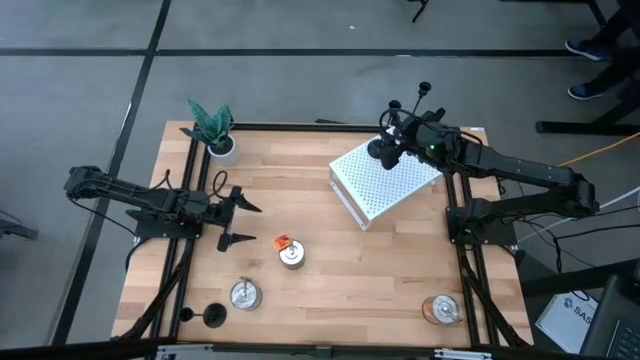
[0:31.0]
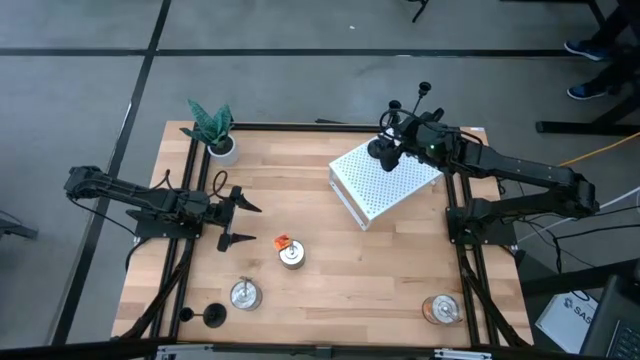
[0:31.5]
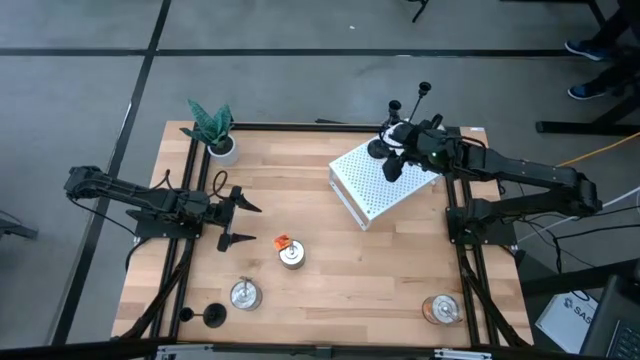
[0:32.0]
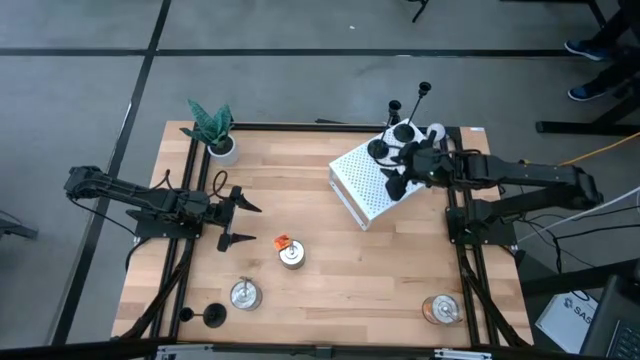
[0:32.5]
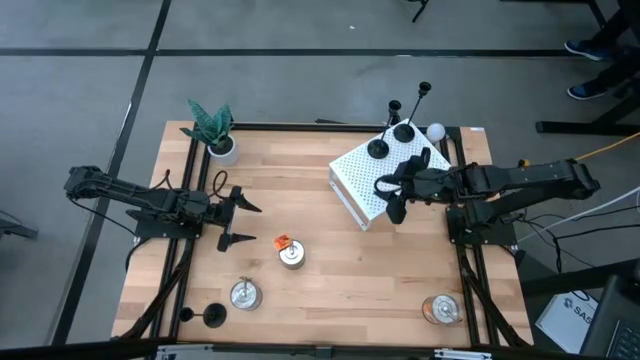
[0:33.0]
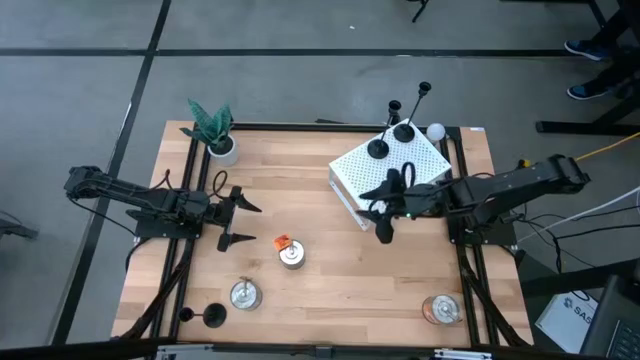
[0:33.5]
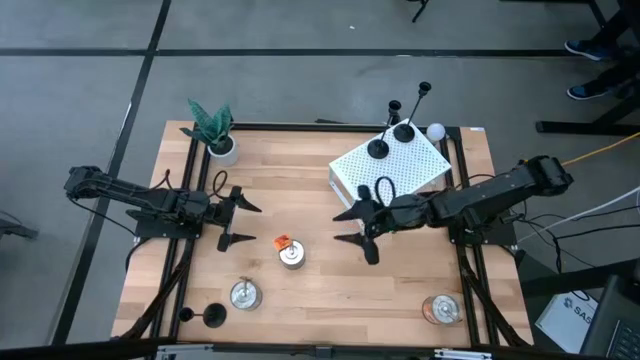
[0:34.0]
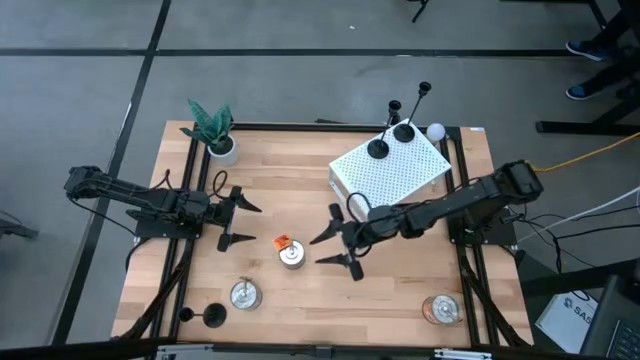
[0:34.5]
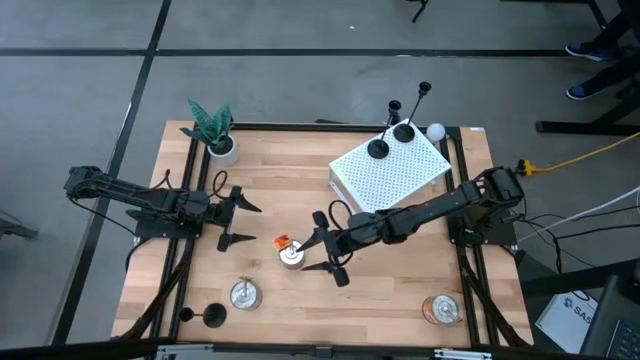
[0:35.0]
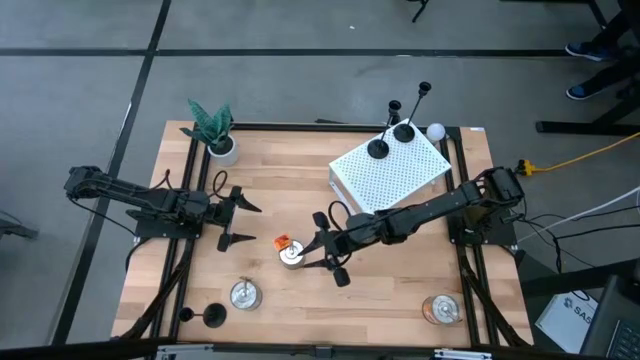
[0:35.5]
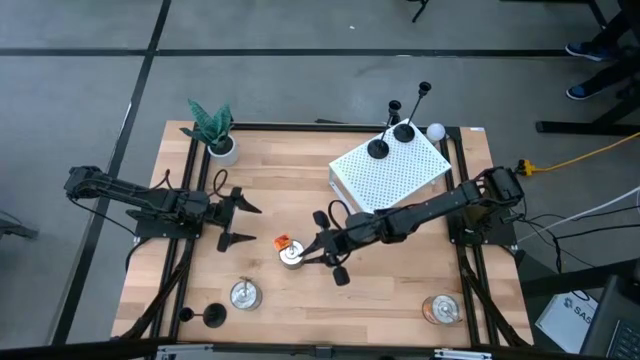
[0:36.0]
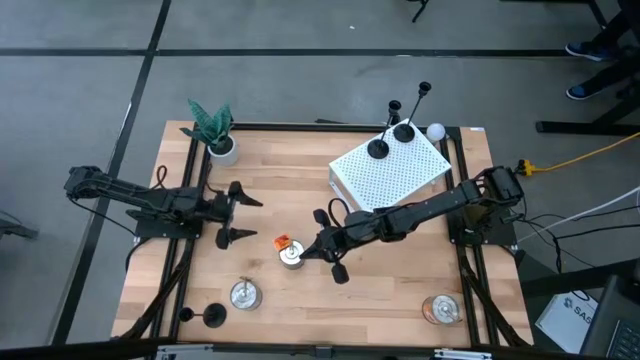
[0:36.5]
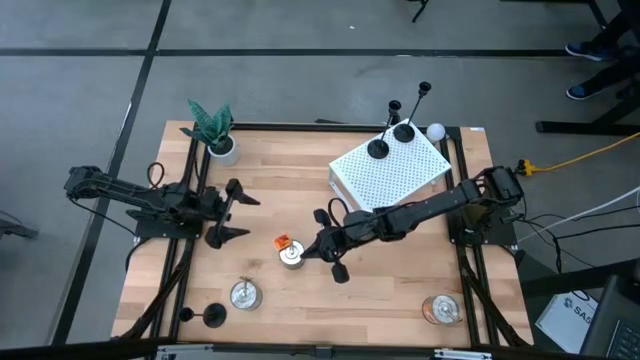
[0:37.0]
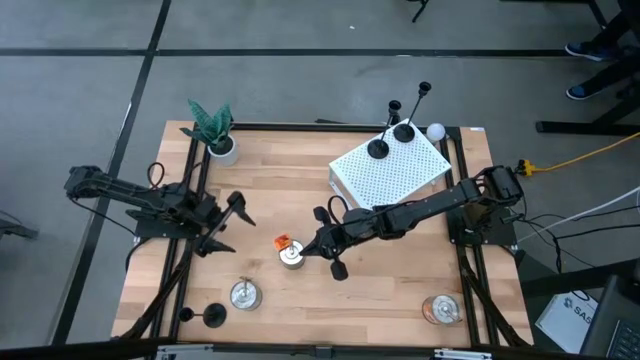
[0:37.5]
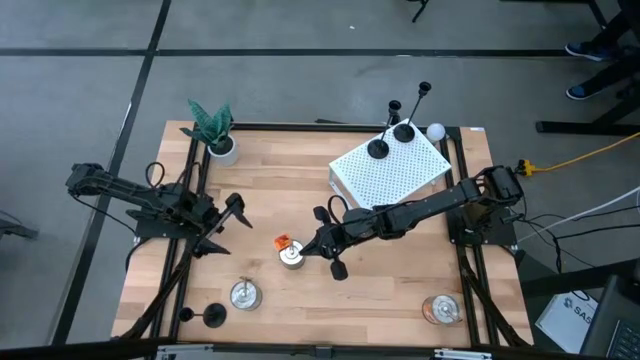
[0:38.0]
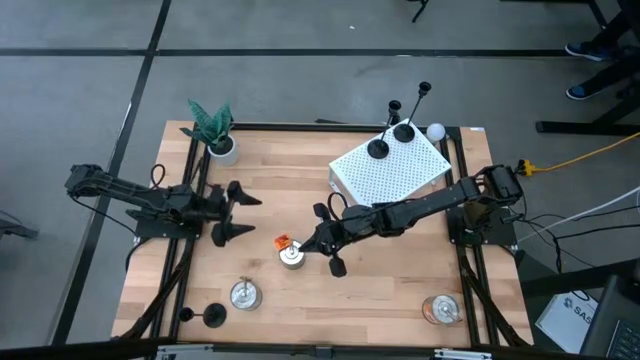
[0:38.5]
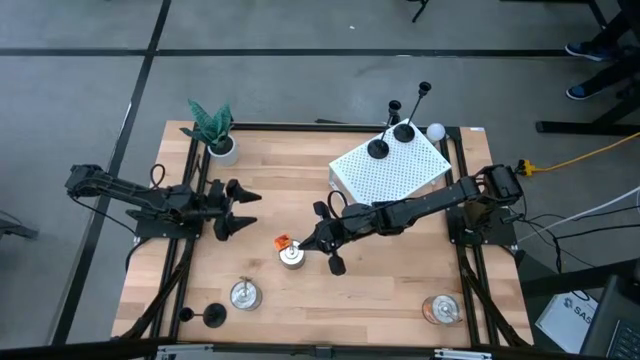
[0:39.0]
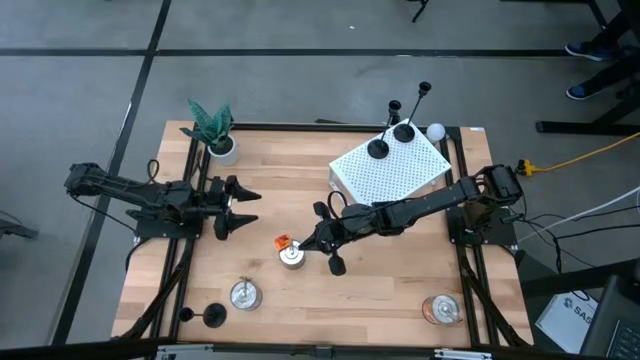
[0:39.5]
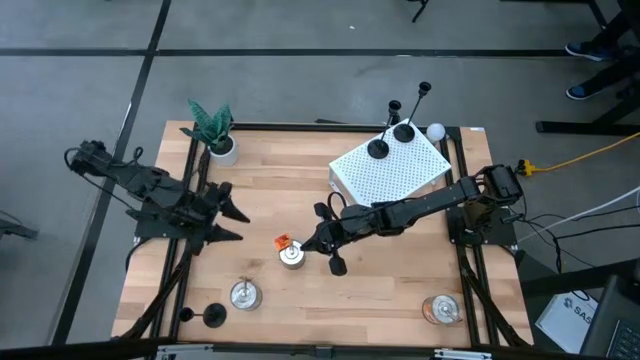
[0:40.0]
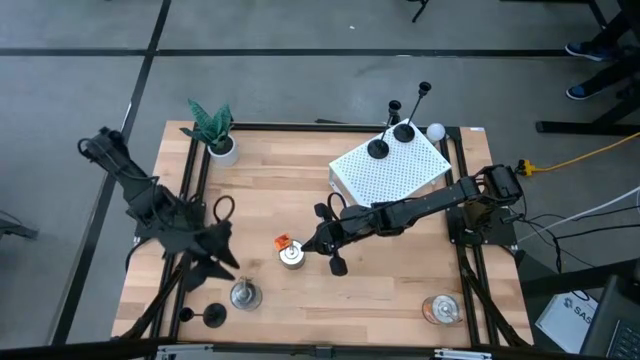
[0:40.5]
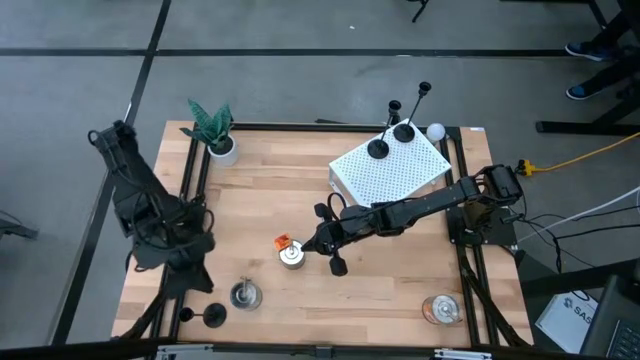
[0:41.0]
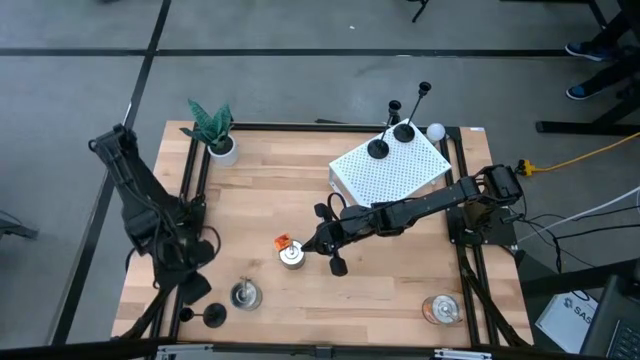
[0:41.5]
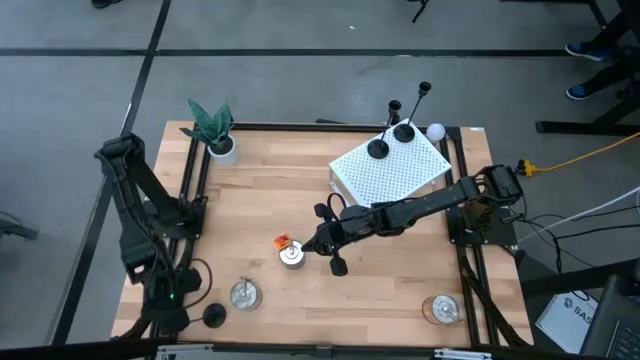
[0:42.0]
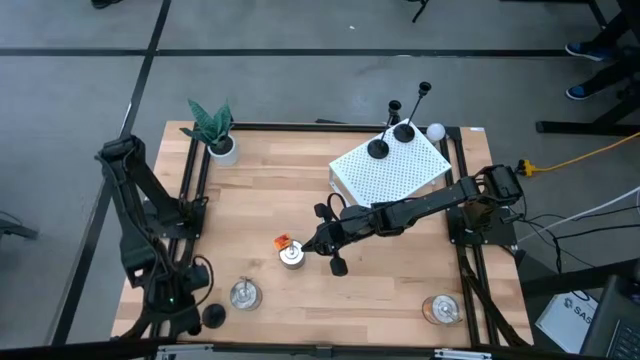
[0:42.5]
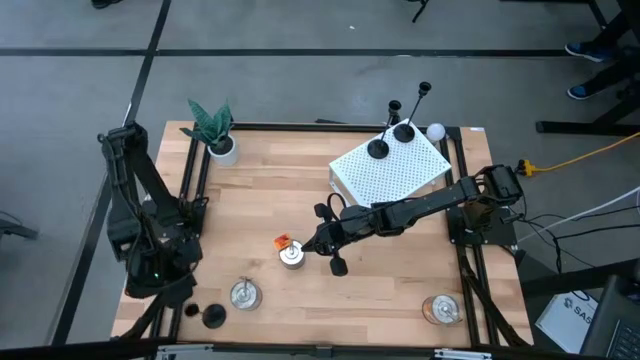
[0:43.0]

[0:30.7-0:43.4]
Task: Pick & Place candle stick holders
Put the black candle holder on the shelf aligned with the other black candle holders

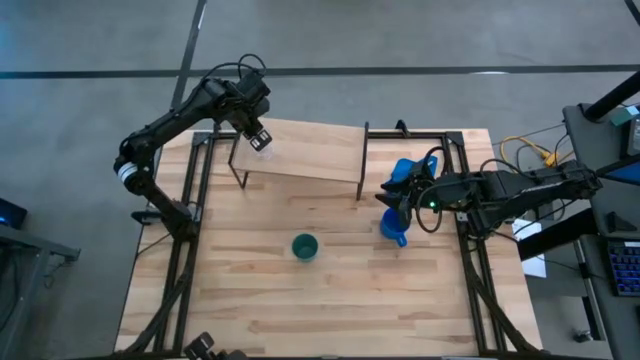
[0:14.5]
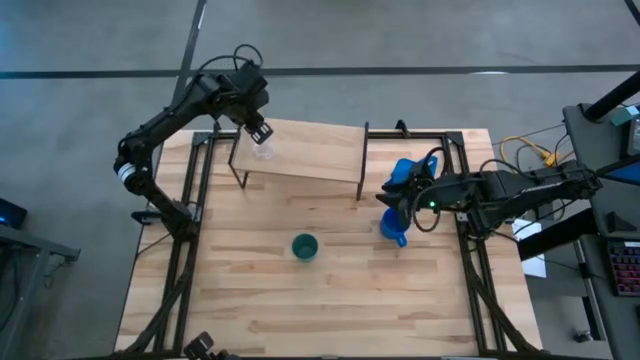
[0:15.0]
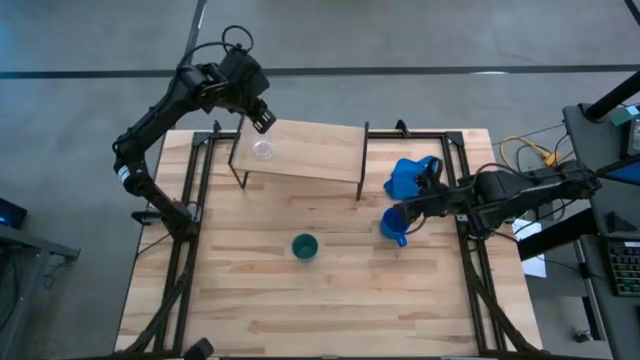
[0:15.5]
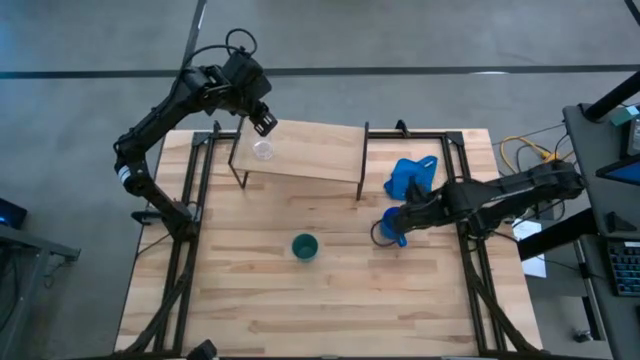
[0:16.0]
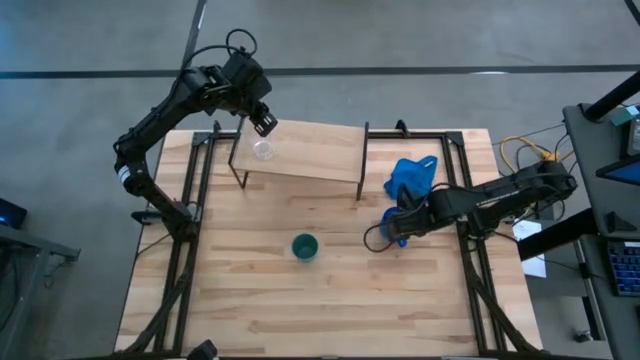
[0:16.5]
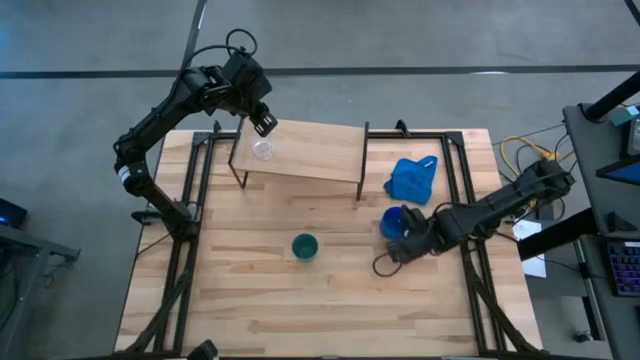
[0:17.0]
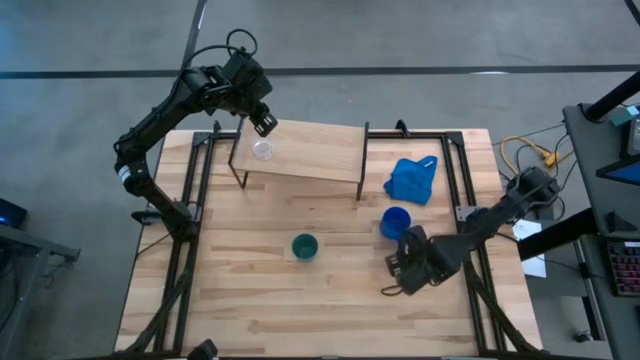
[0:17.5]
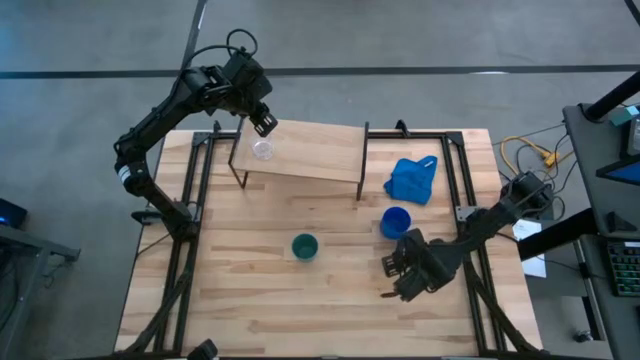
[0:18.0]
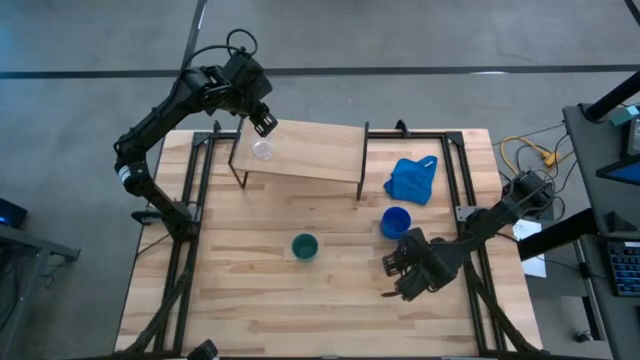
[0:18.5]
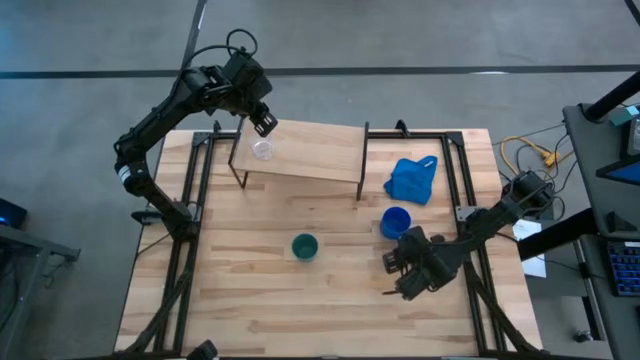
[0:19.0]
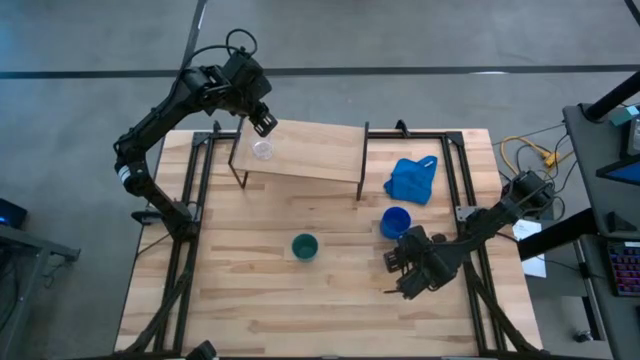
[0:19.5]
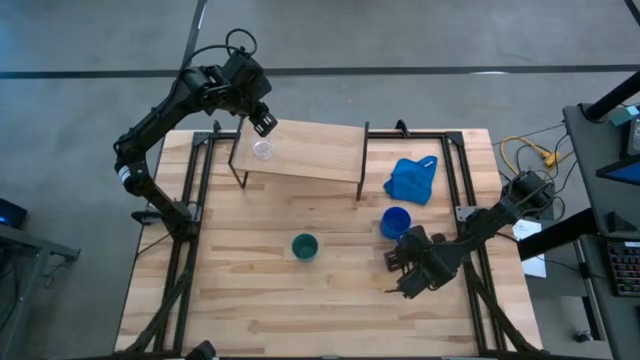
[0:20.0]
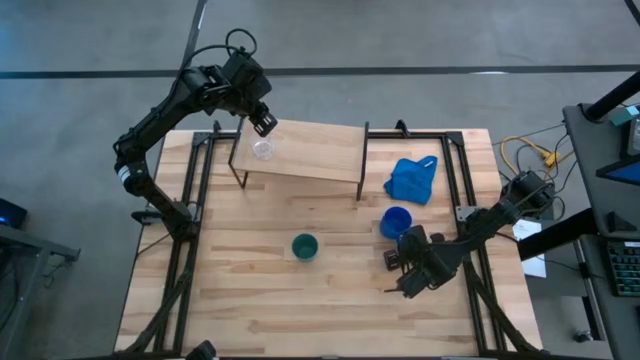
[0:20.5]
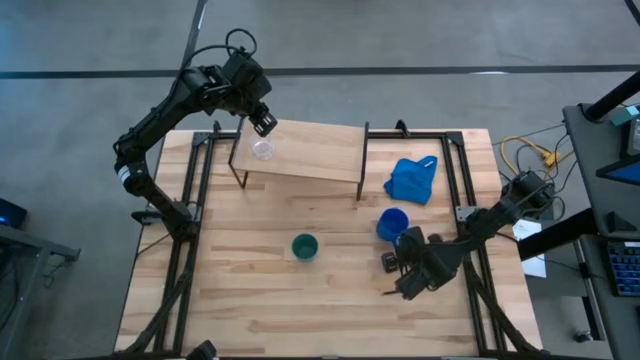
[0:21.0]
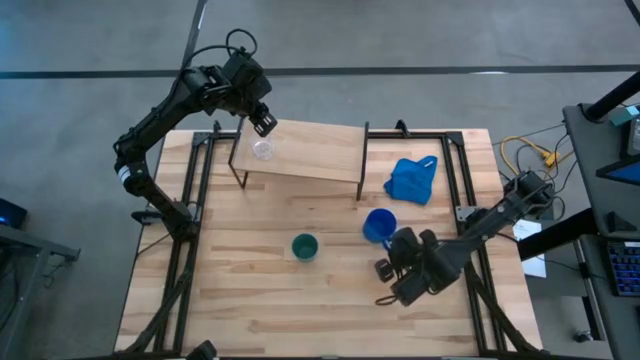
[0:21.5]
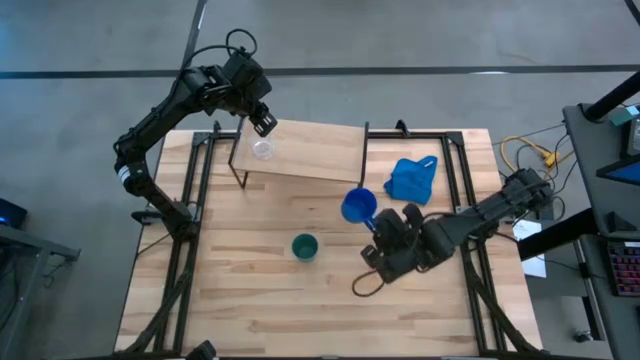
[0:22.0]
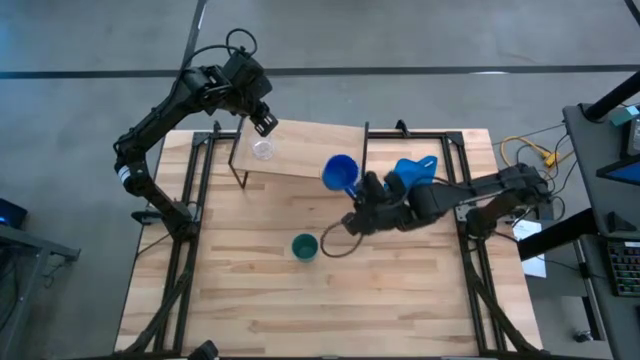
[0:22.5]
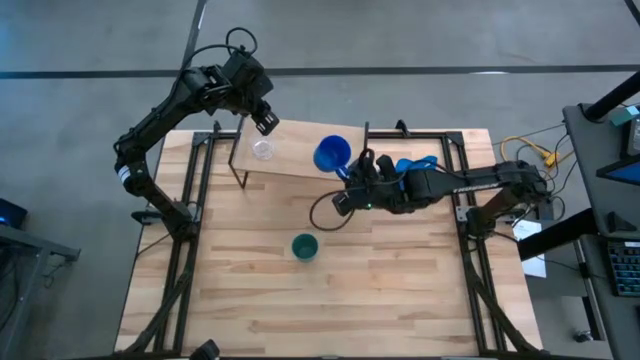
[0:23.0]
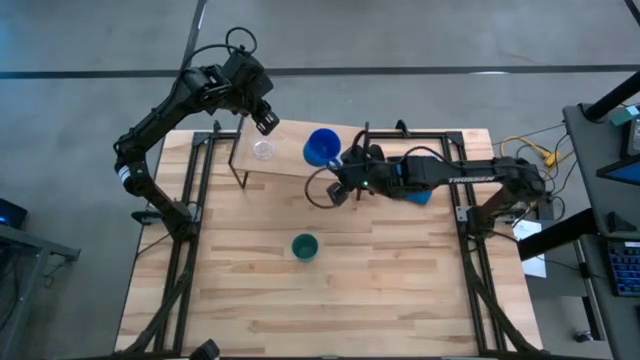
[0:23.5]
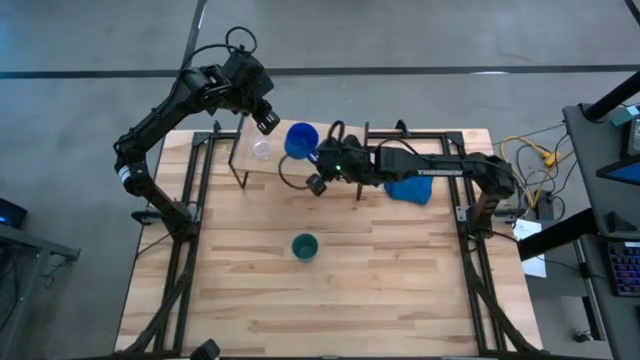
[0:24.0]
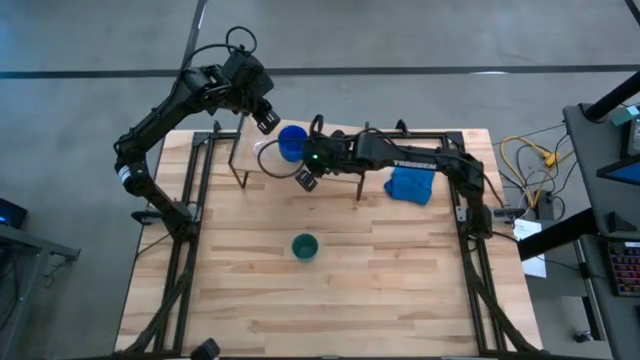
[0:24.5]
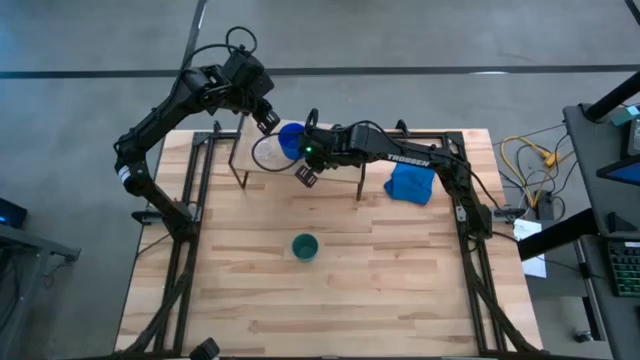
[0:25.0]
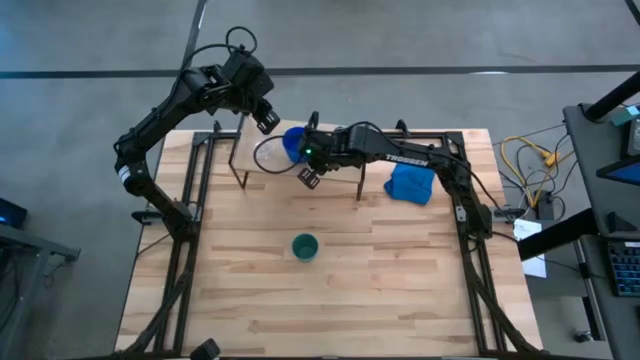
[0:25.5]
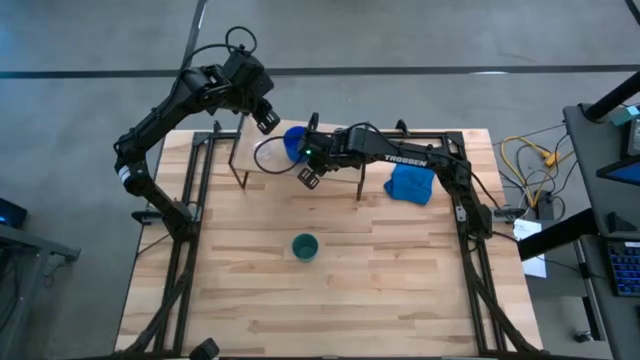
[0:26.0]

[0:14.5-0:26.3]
Task: Stack small to large cups/mugs on shelf
Put the blue cup on the shelf
